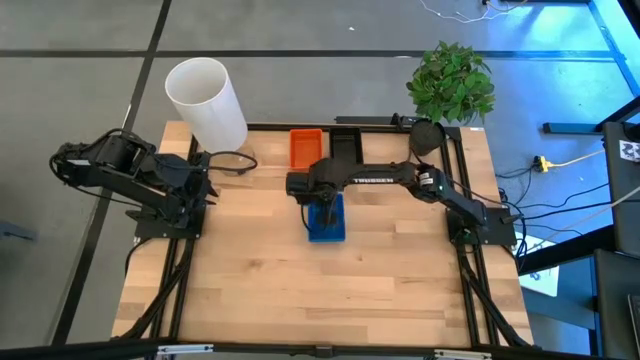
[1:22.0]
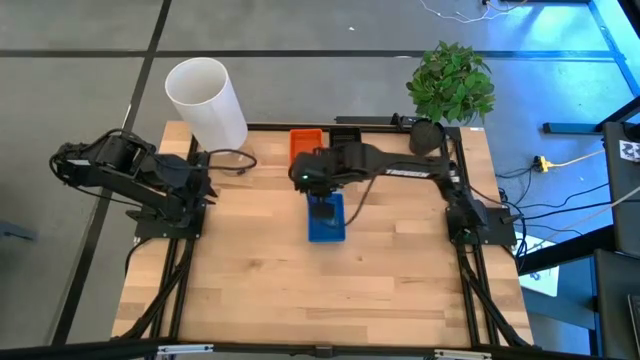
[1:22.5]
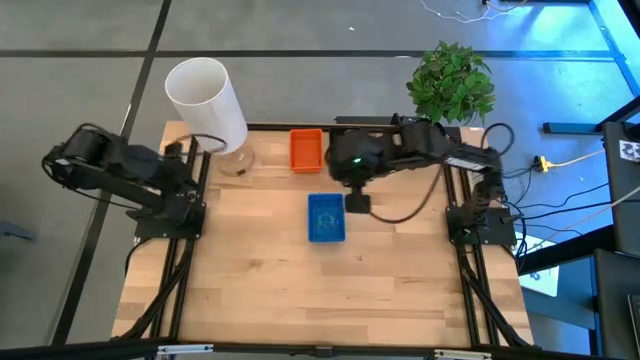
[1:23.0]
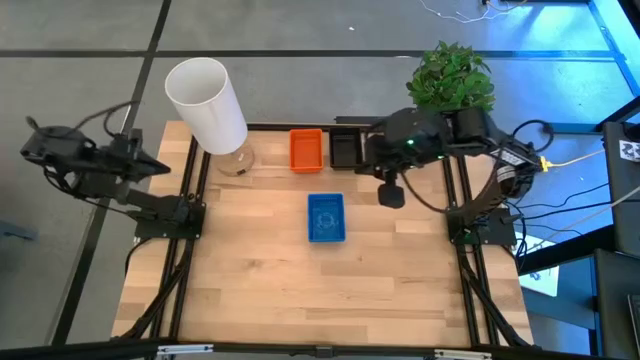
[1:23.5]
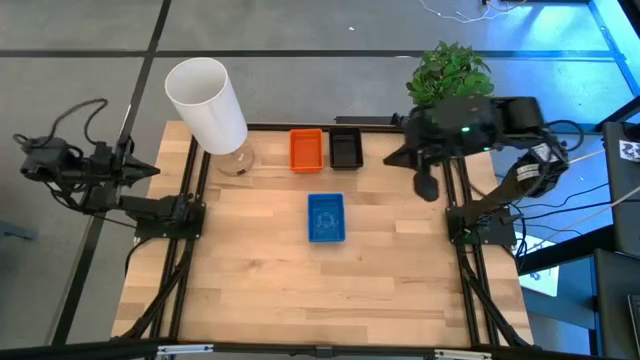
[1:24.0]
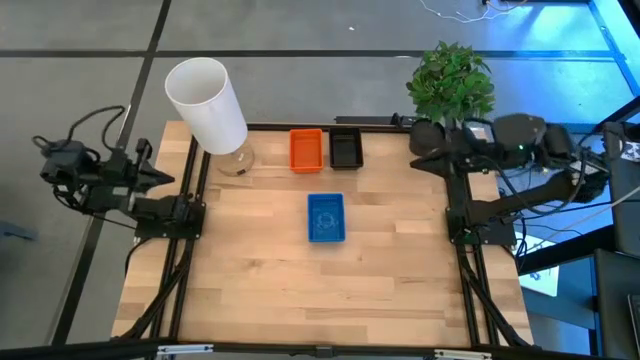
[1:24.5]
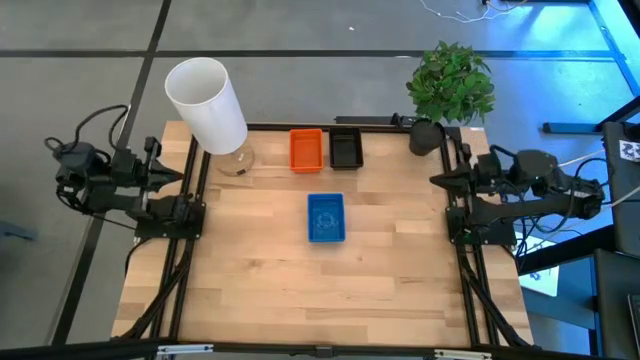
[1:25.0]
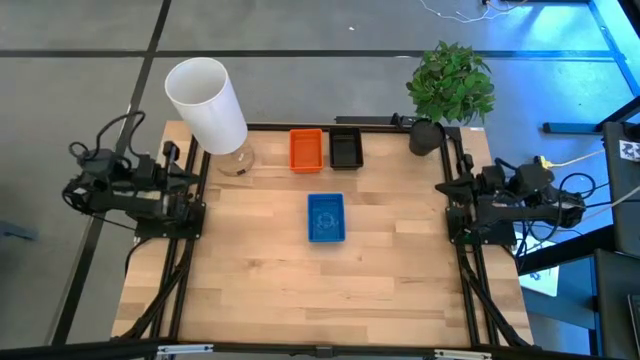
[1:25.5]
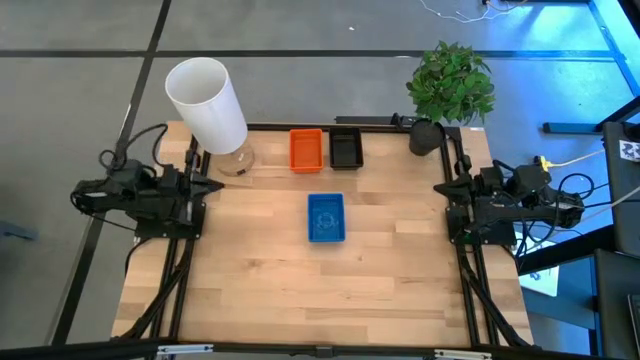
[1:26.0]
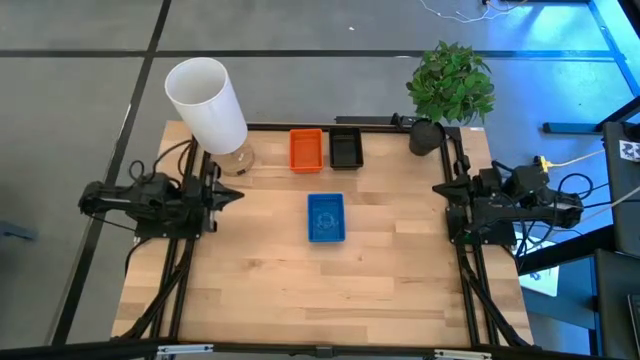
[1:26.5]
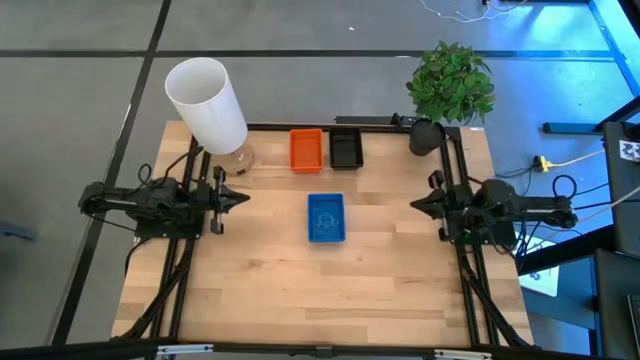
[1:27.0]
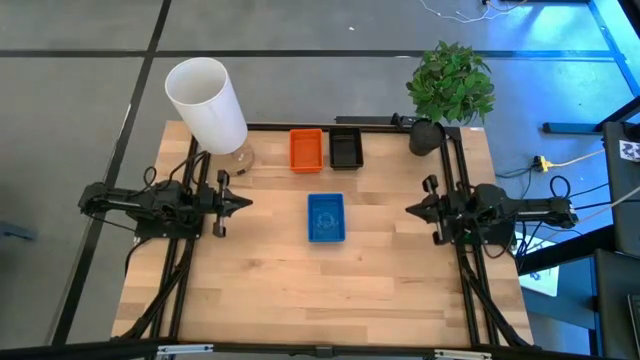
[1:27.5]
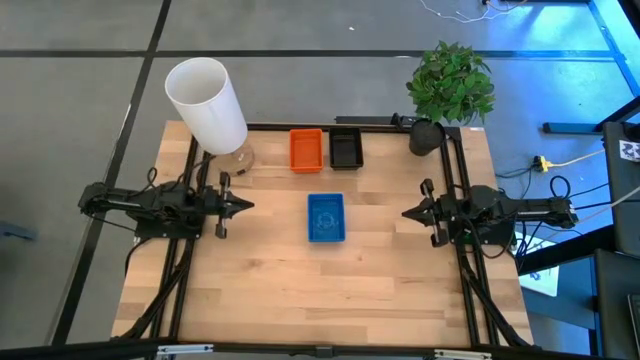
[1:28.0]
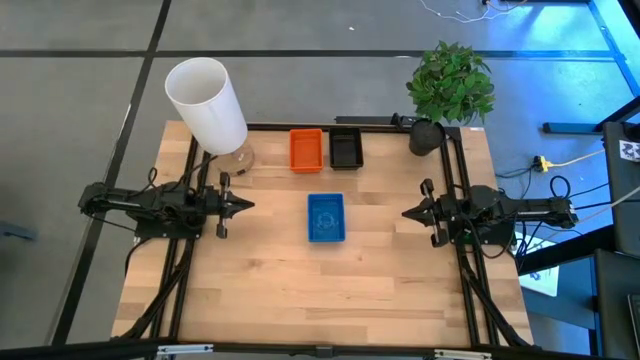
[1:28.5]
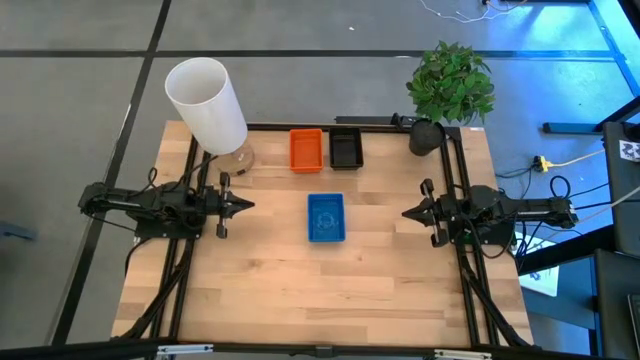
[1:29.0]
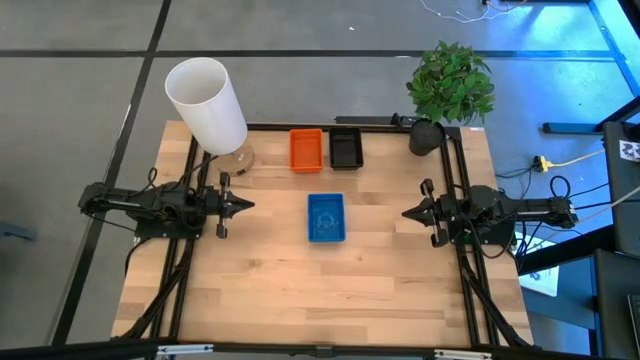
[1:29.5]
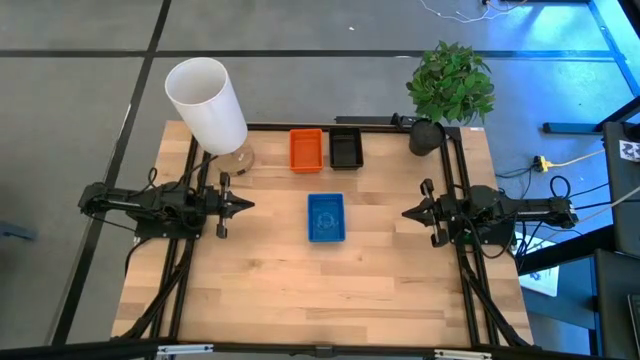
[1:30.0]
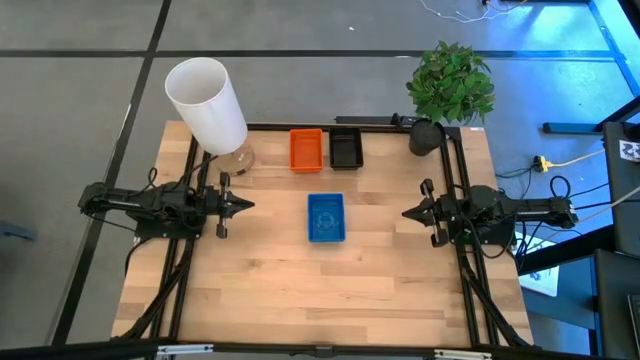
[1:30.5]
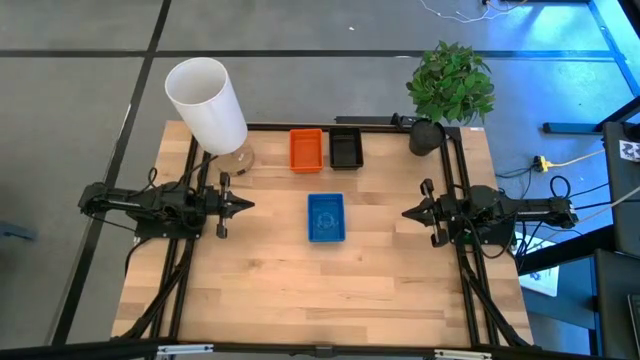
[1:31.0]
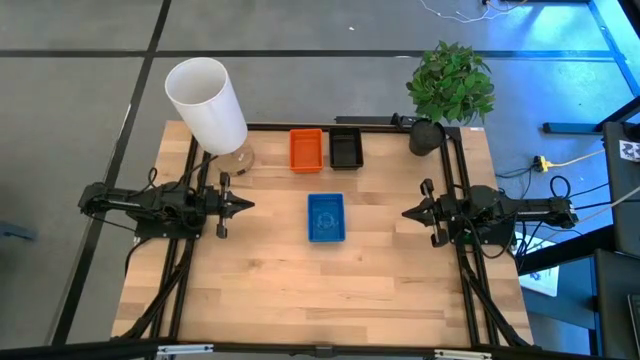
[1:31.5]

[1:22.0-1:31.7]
Return to Home Position
